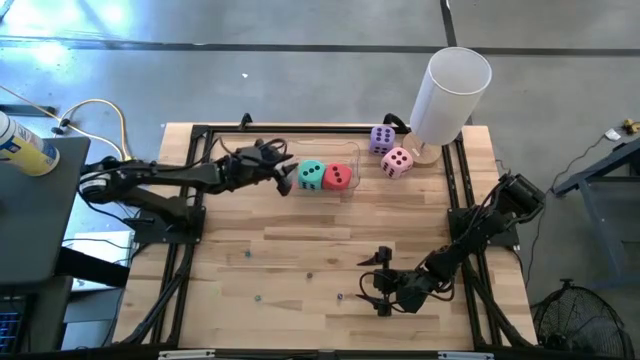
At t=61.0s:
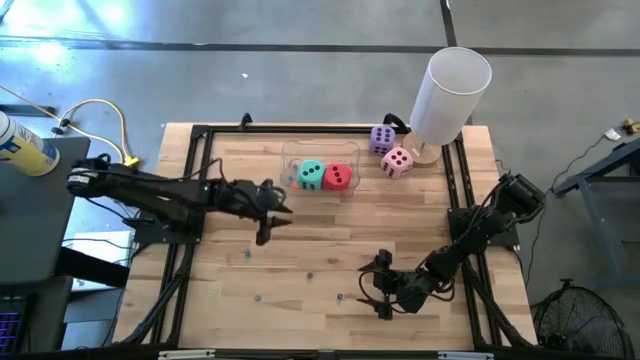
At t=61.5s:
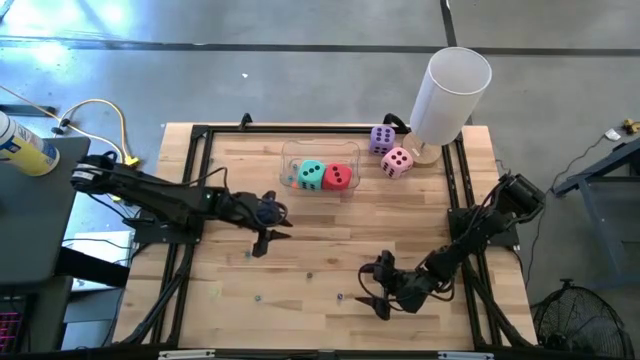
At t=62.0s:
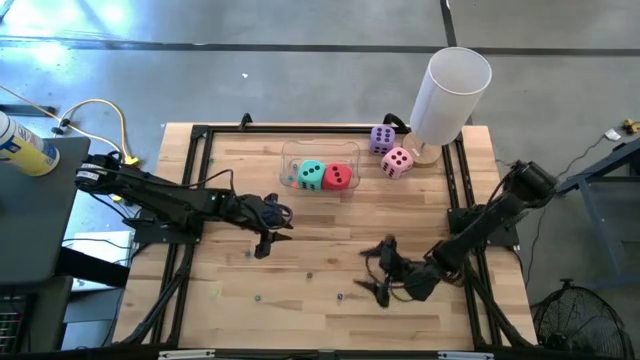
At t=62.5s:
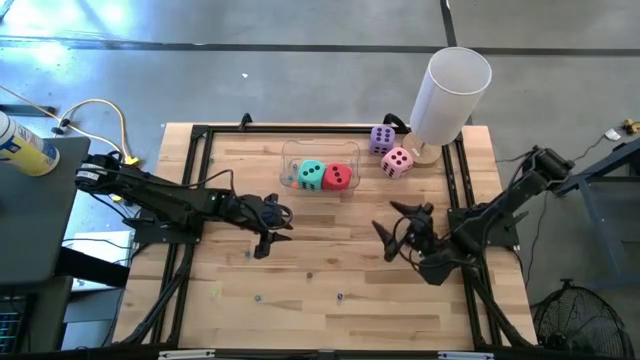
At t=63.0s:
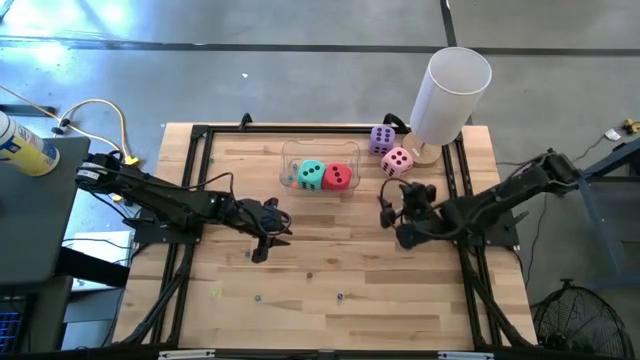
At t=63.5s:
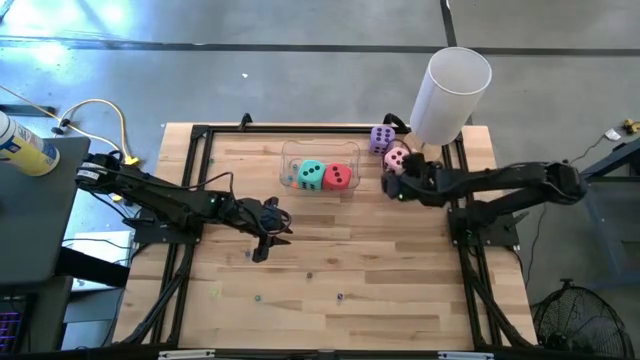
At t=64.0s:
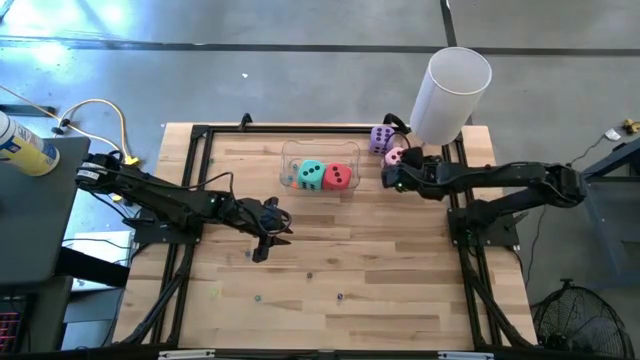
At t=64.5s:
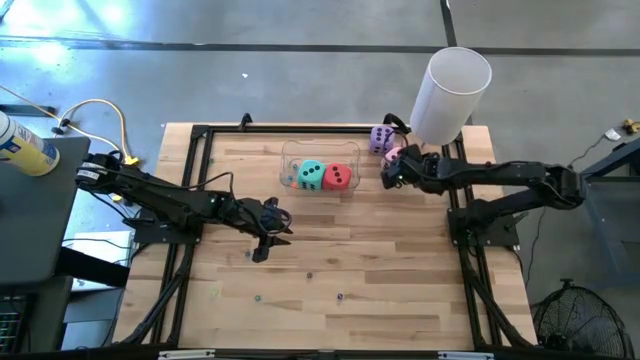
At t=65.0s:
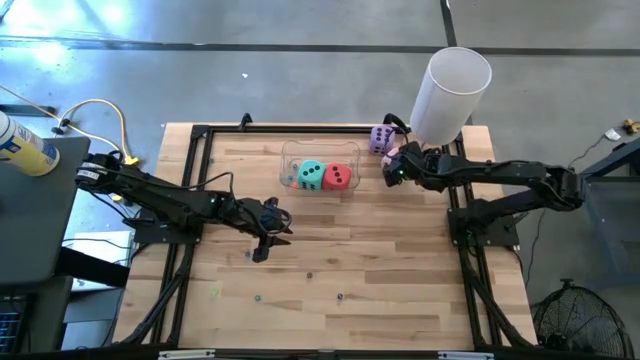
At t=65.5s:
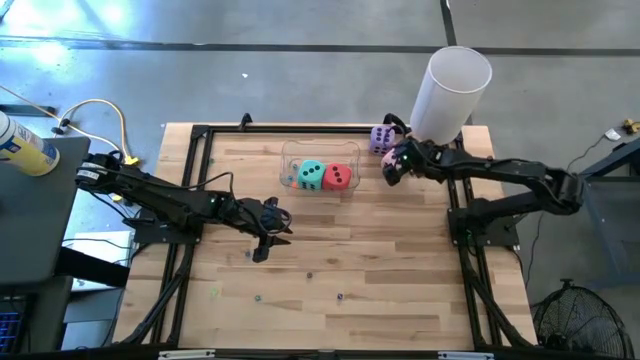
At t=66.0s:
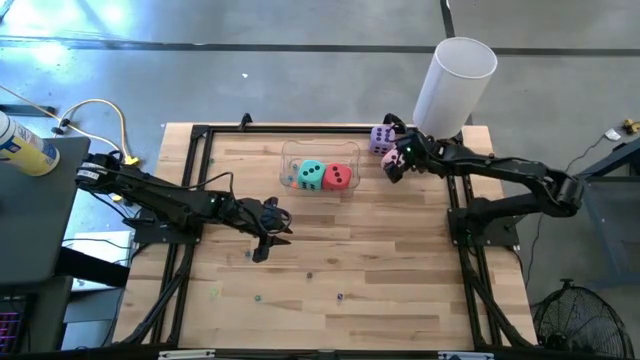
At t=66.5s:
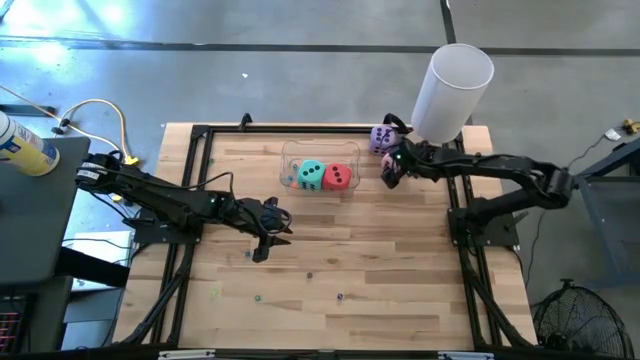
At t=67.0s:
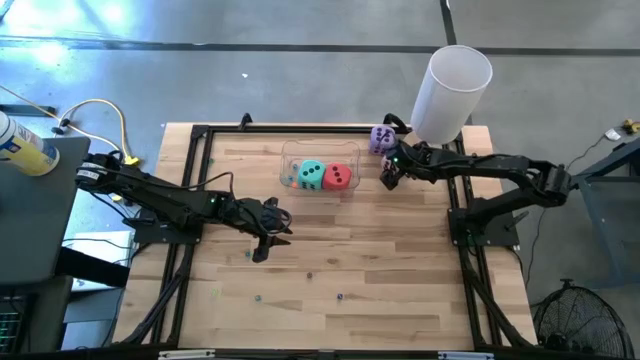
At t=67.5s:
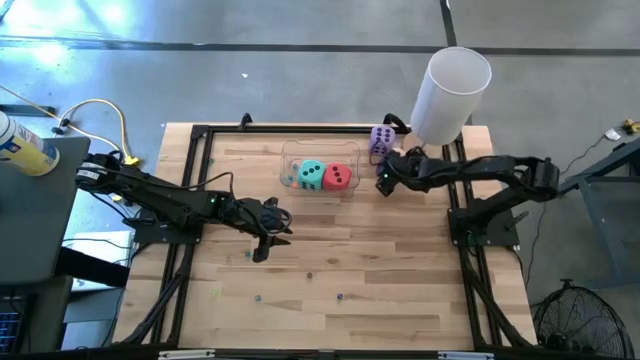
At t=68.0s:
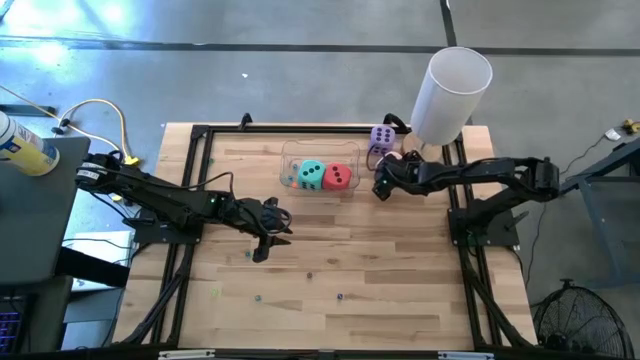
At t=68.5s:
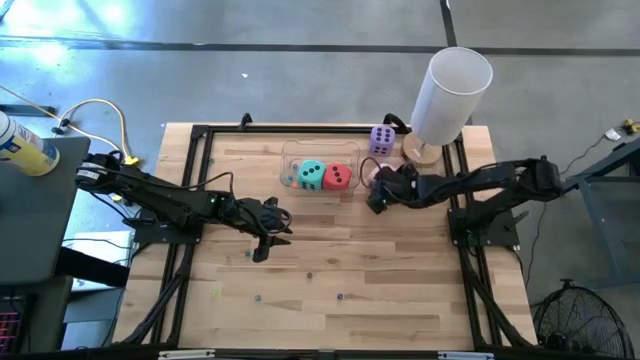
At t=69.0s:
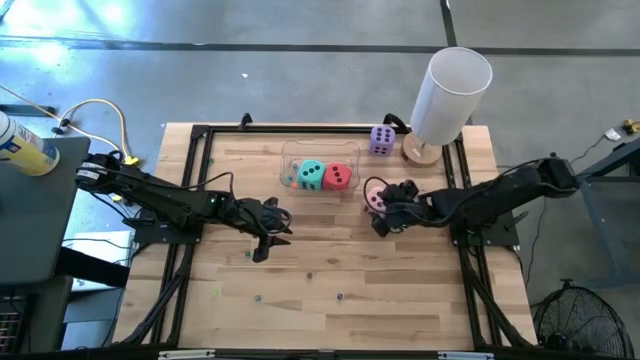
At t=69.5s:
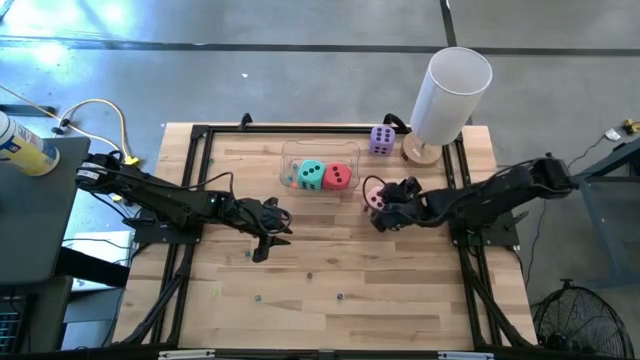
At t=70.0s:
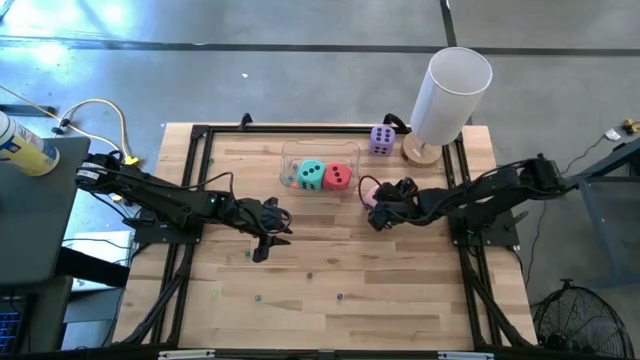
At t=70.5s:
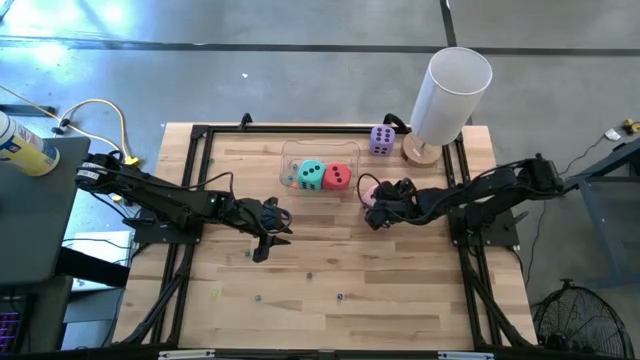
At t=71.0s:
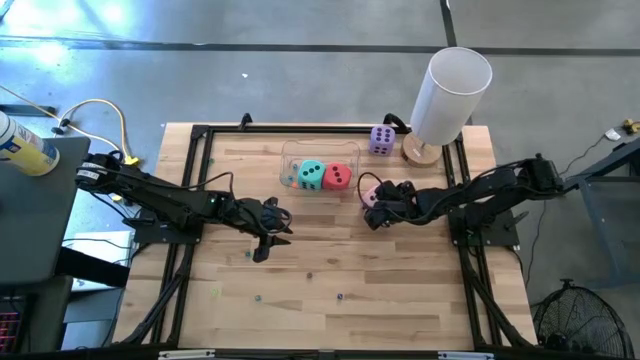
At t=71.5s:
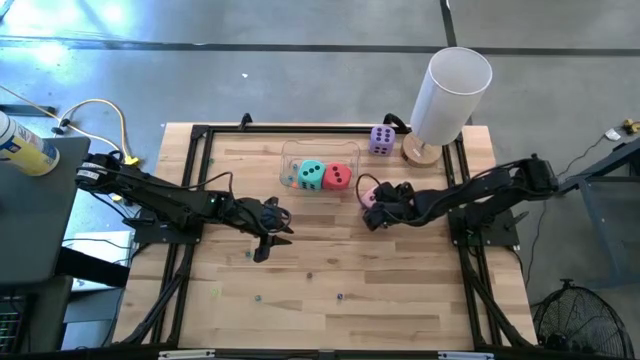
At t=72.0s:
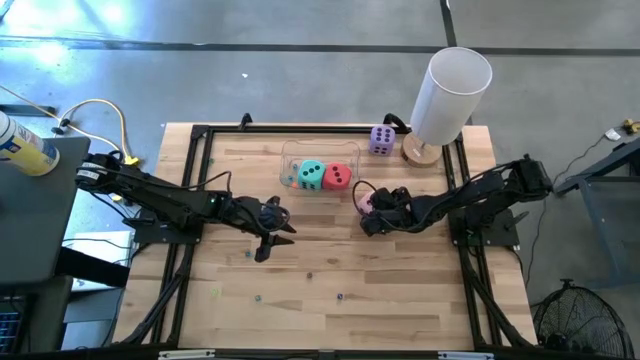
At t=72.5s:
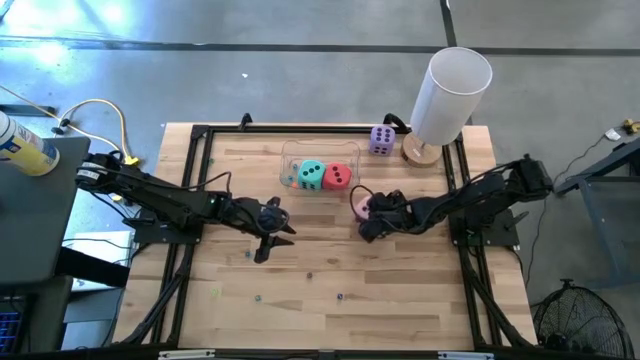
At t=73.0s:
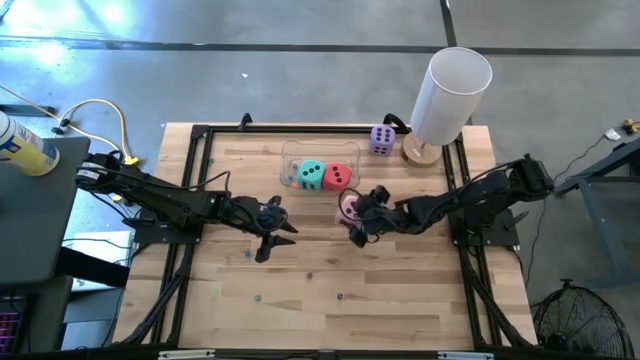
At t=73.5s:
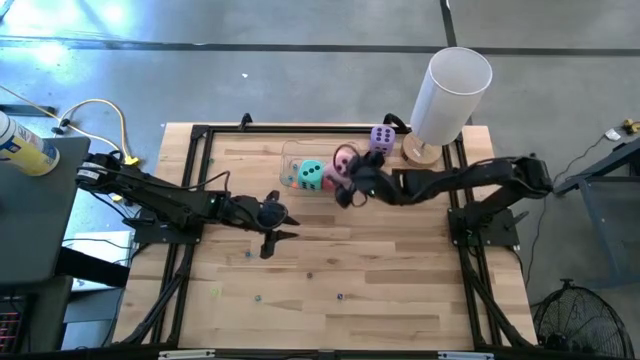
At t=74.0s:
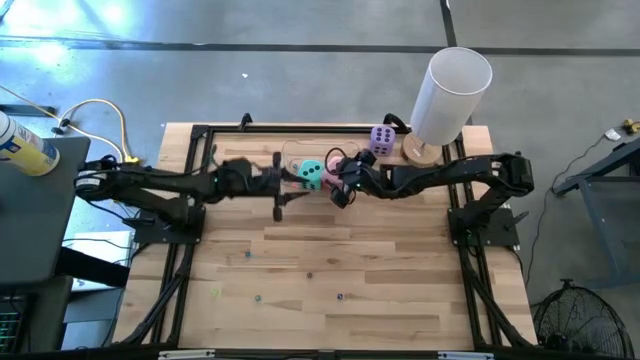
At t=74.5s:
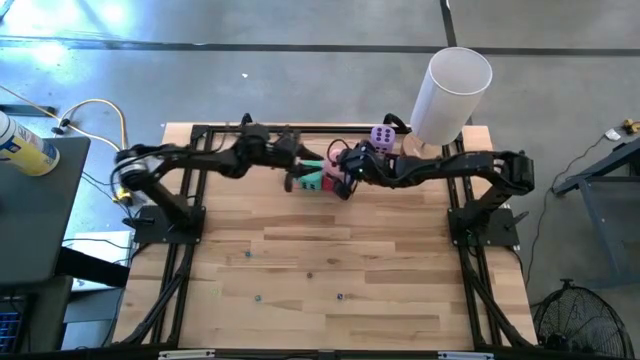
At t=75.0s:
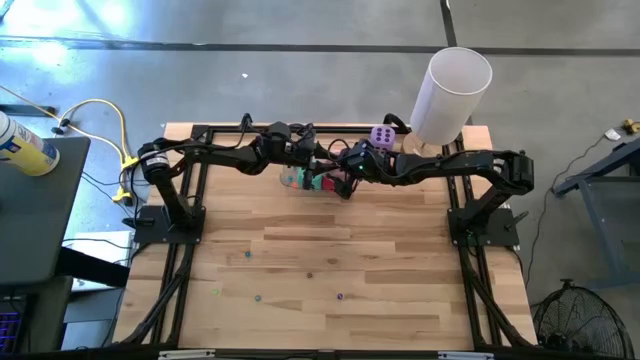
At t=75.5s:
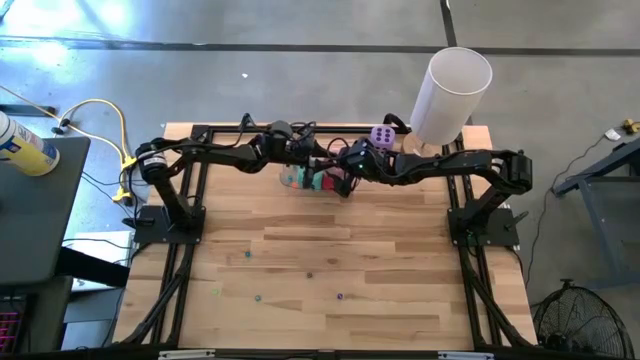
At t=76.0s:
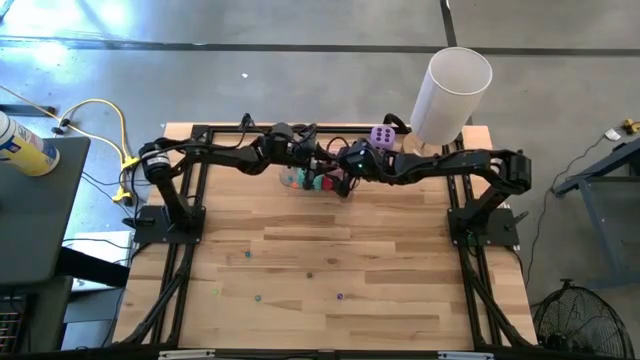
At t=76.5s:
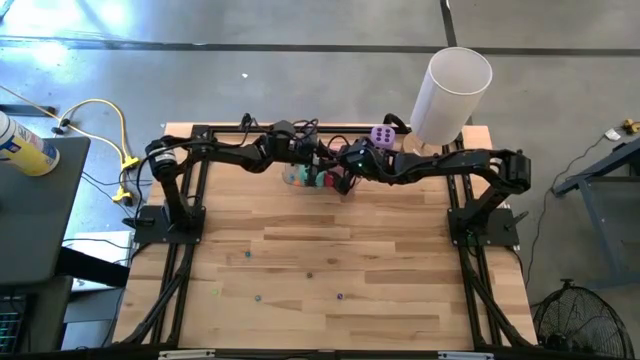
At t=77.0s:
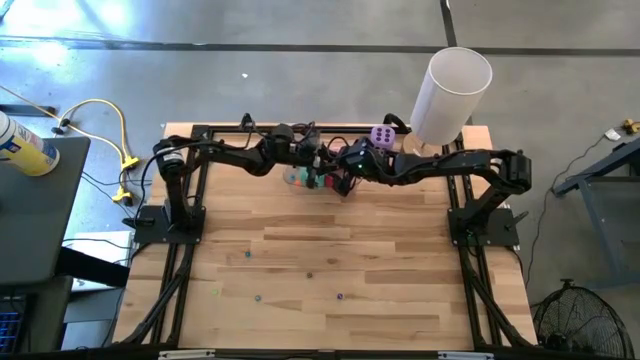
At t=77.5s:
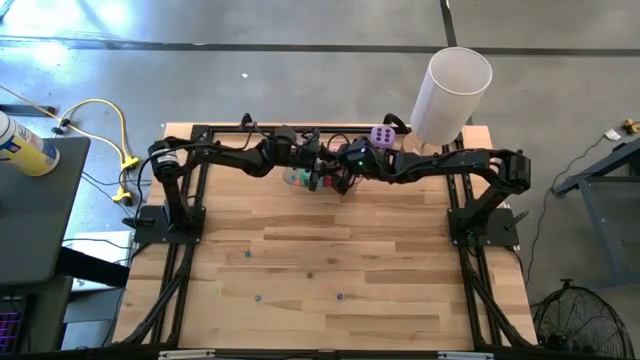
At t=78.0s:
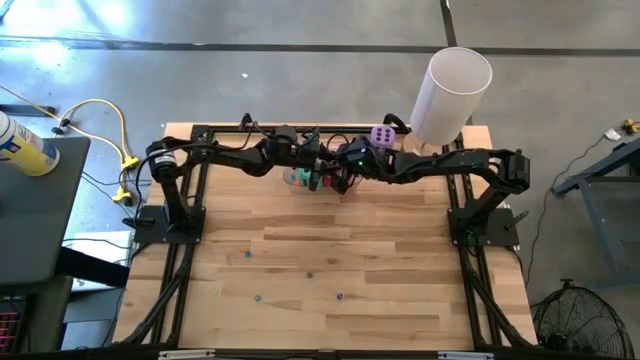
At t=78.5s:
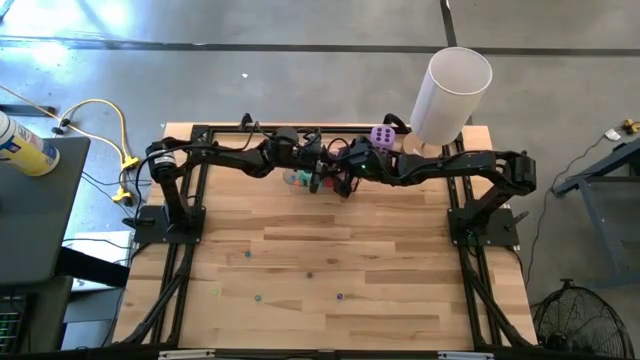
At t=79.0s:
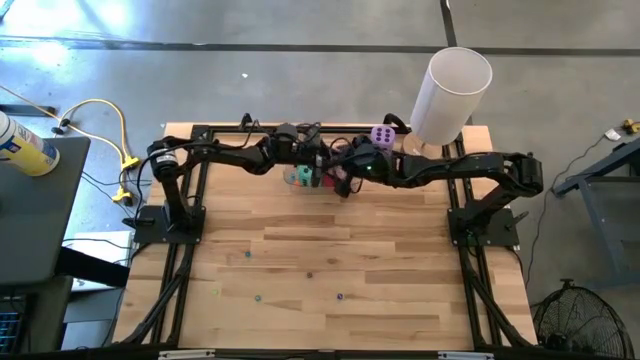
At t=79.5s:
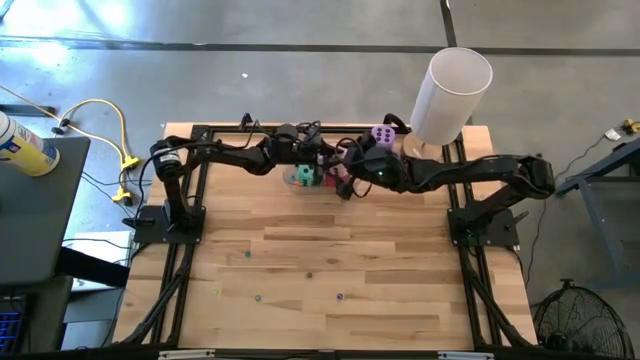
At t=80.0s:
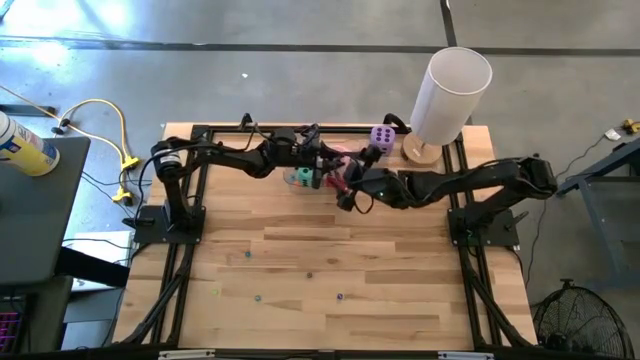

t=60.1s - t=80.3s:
Task: Pick & Place Dice
Put the large pink dice into the transparent bin
